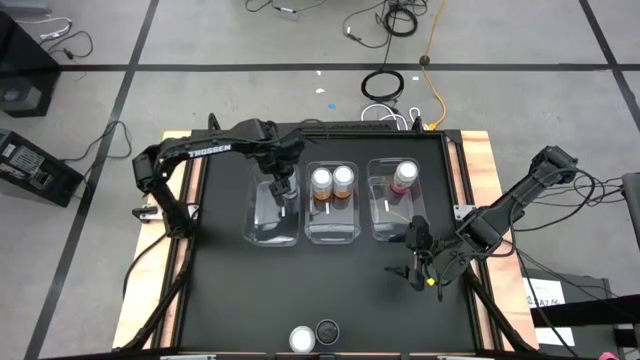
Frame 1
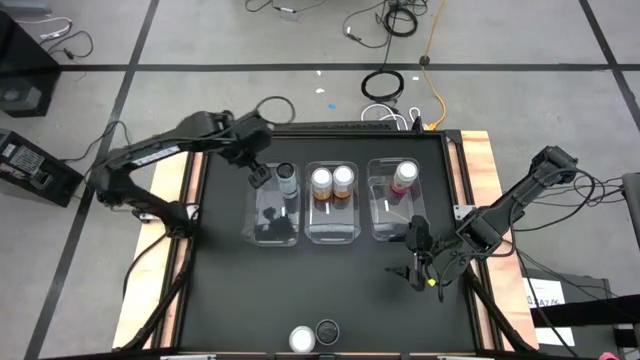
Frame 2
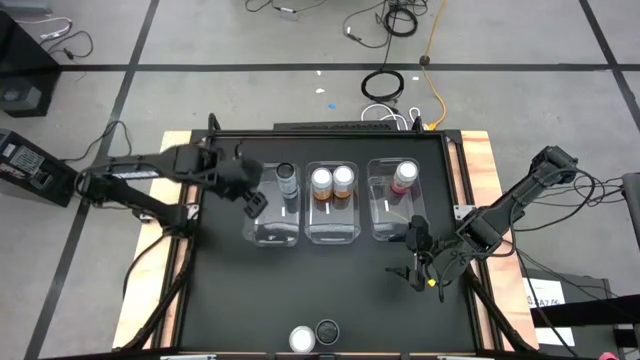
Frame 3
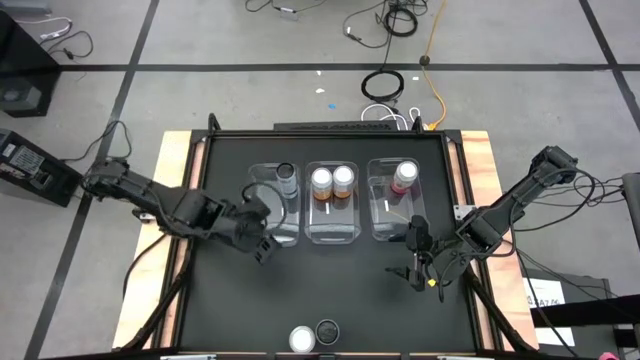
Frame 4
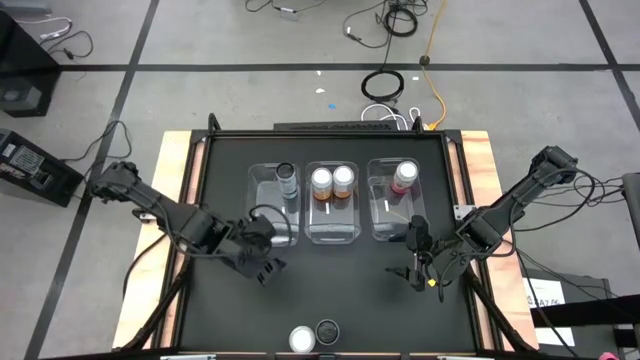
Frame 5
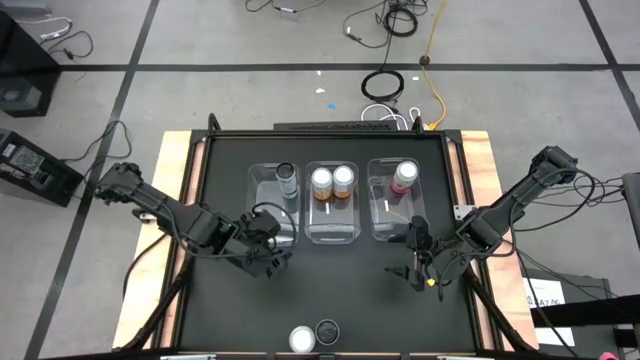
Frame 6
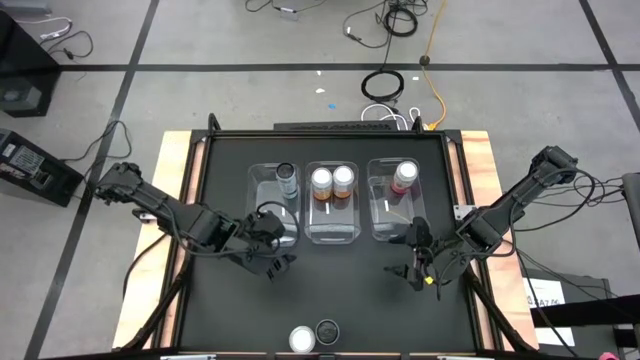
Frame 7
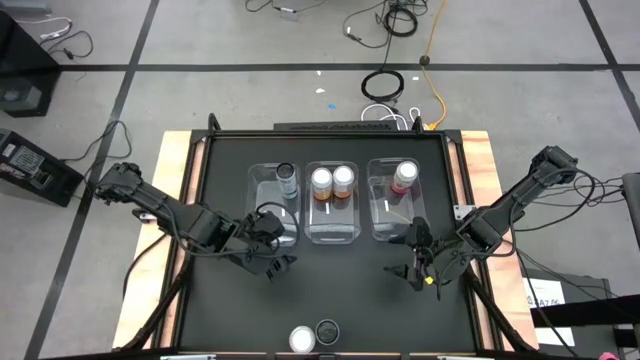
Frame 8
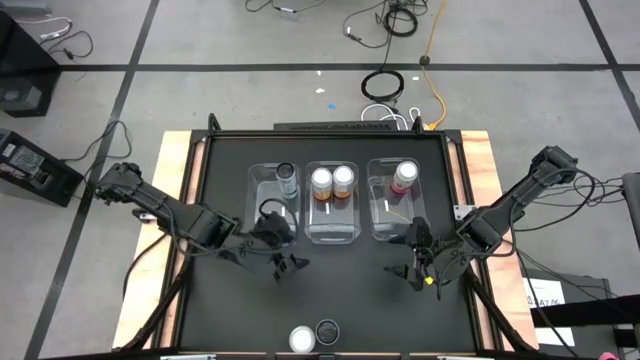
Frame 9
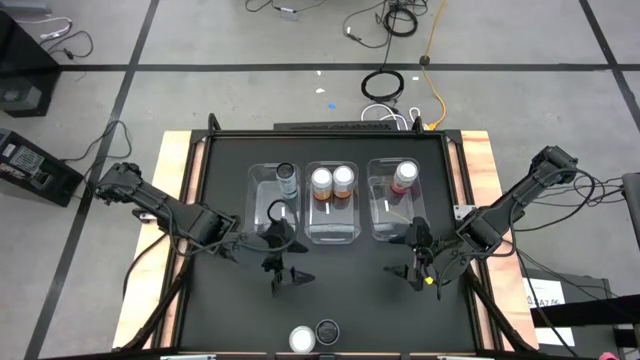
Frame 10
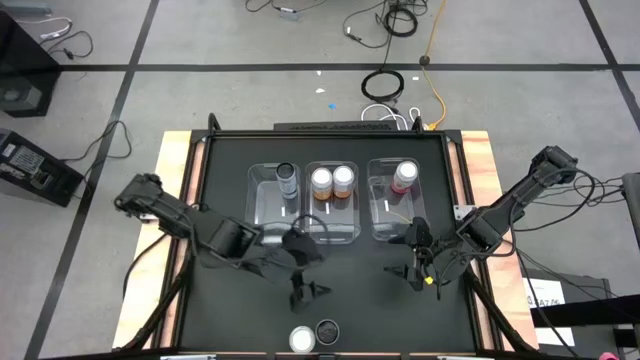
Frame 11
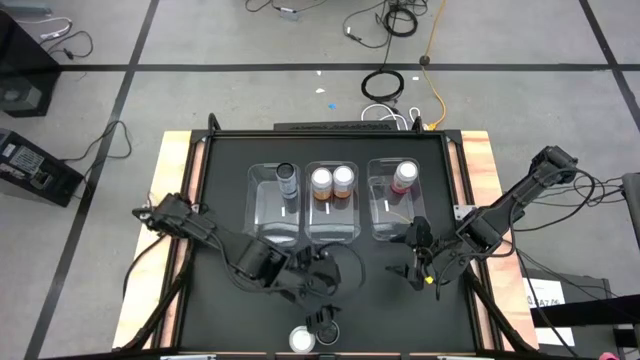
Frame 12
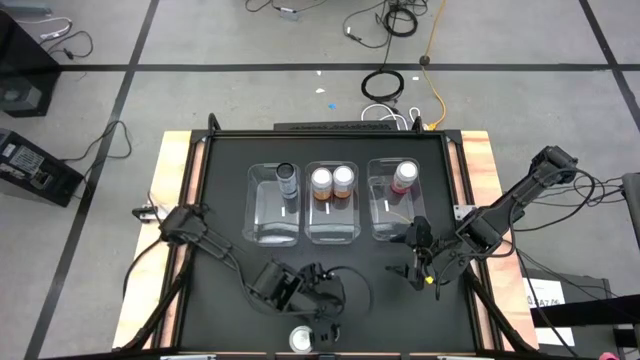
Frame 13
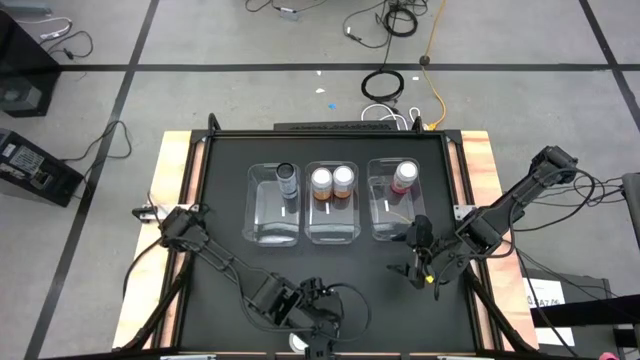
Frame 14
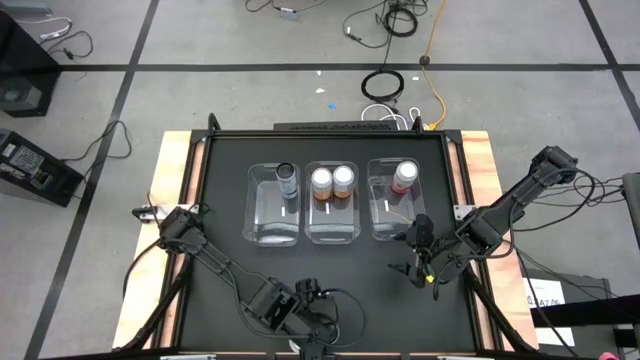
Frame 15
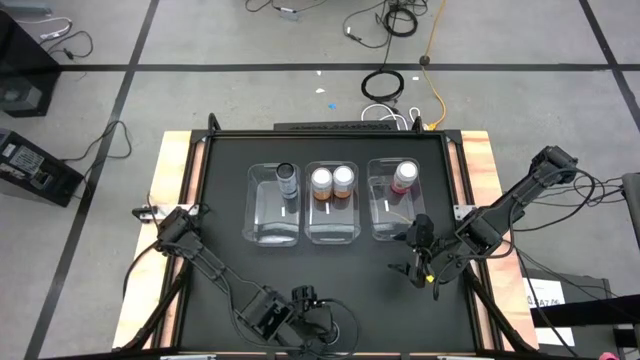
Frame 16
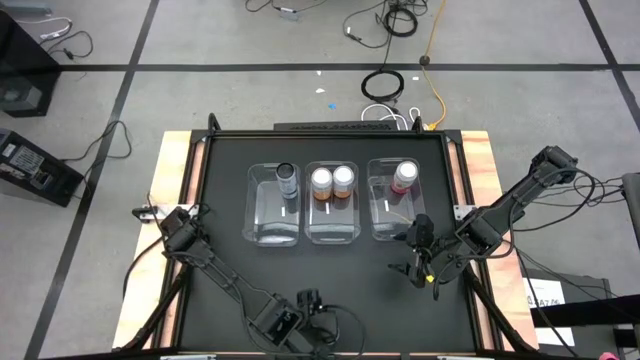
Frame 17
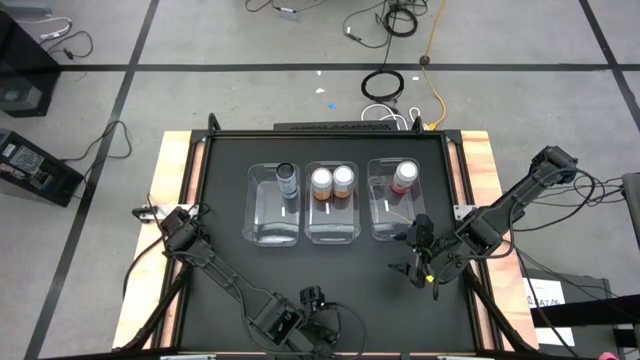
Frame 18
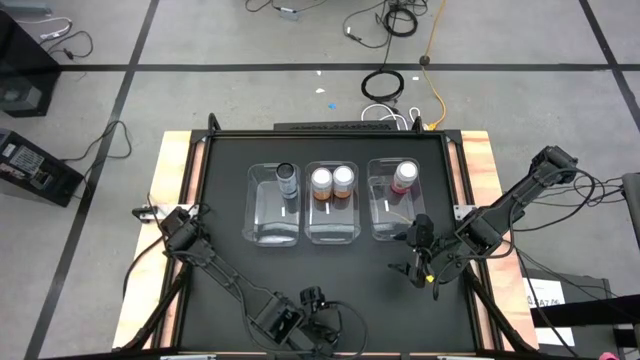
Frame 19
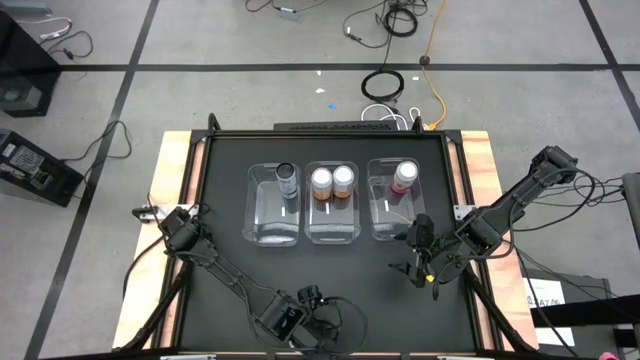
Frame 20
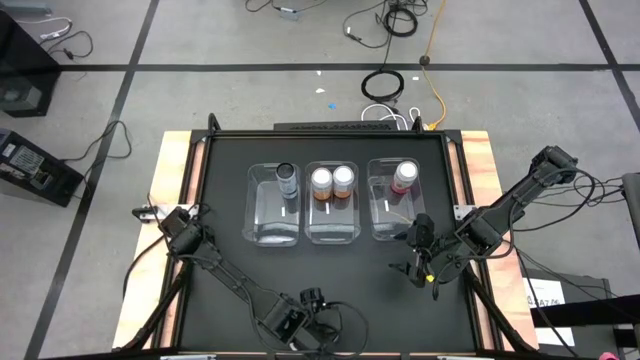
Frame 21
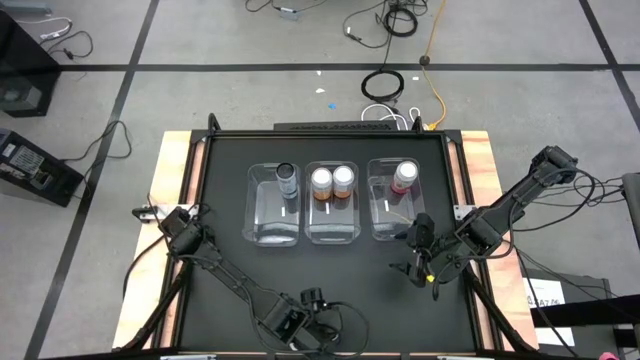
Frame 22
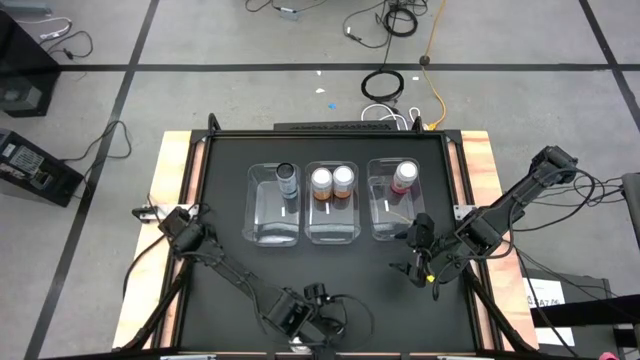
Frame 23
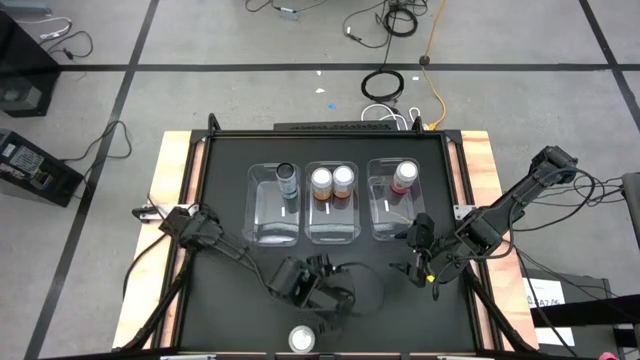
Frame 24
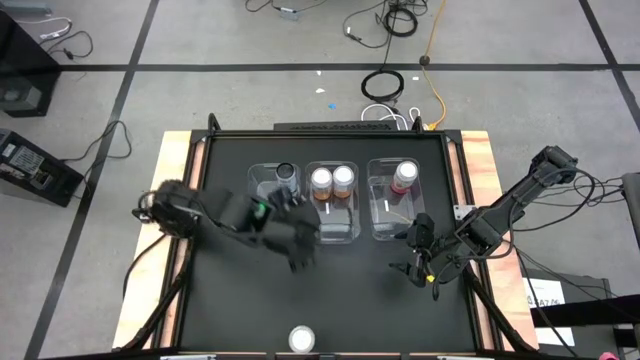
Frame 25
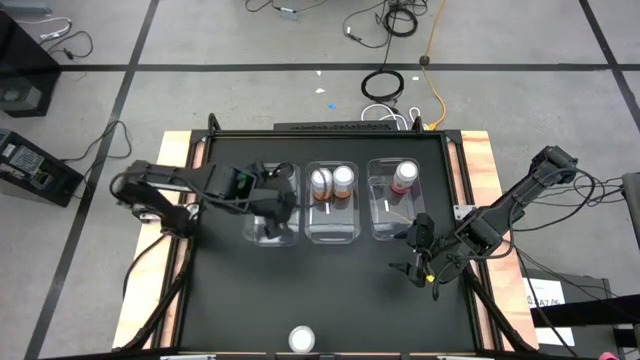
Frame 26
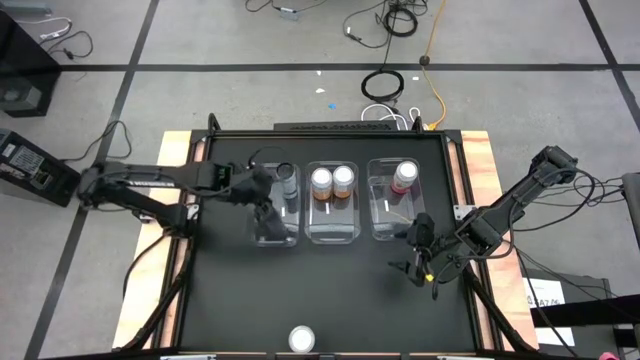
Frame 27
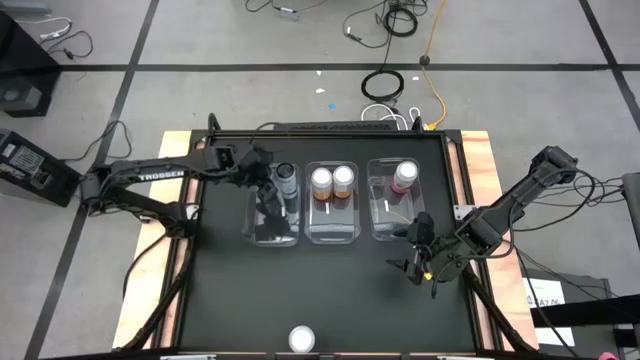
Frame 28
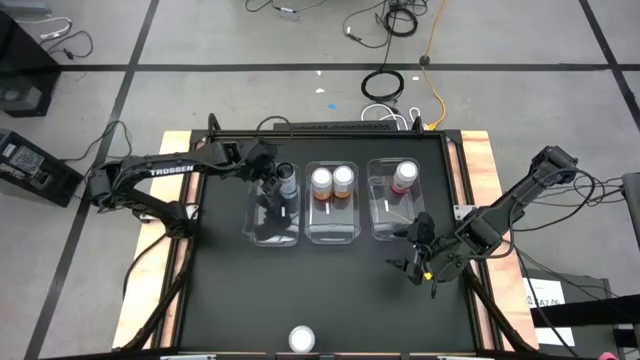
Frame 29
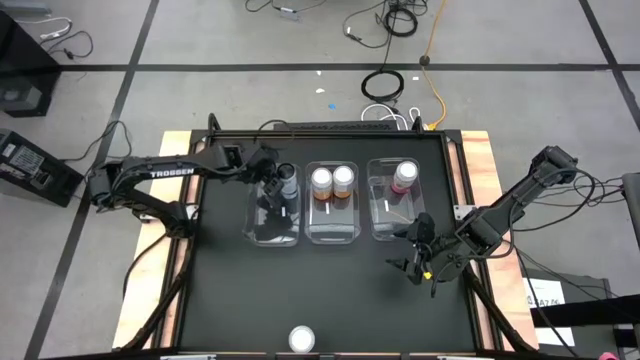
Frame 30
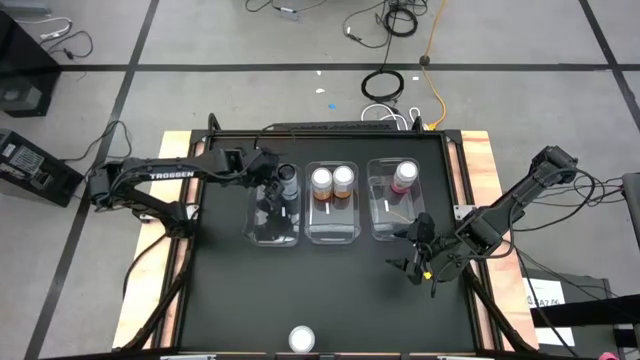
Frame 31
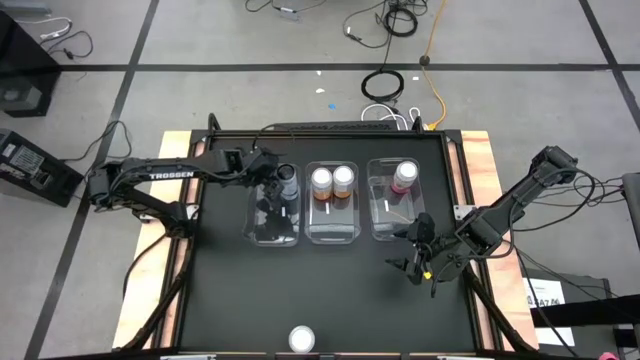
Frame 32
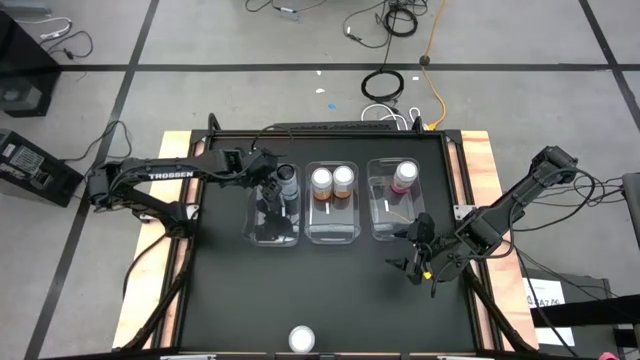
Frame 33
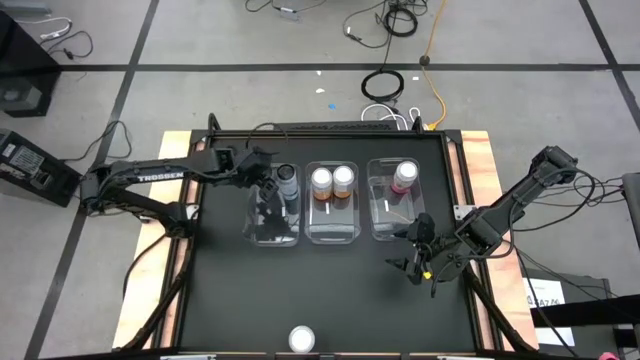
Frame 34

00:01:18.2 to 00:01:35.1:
Task: Sort soda cans
Put the white soda can into the left transparent bin

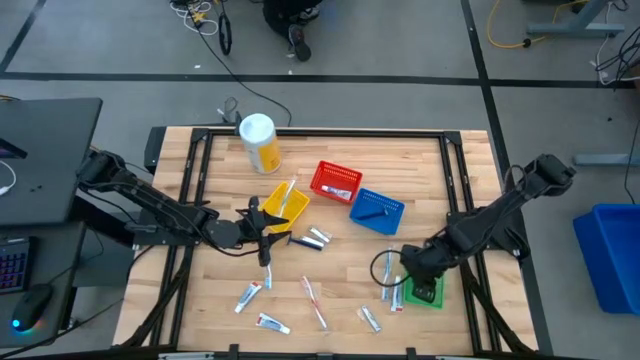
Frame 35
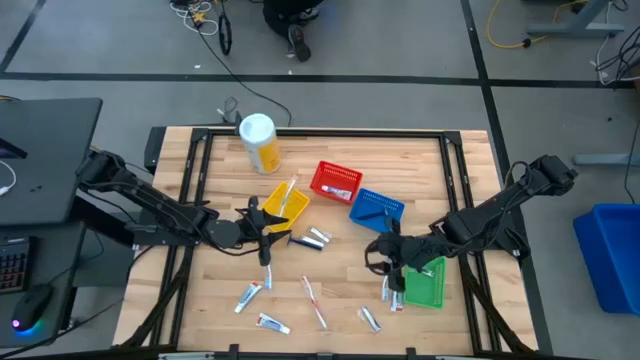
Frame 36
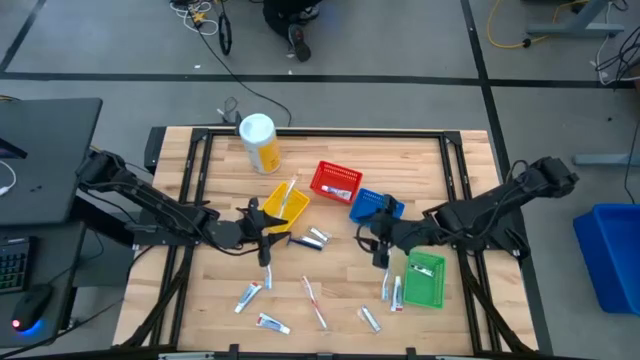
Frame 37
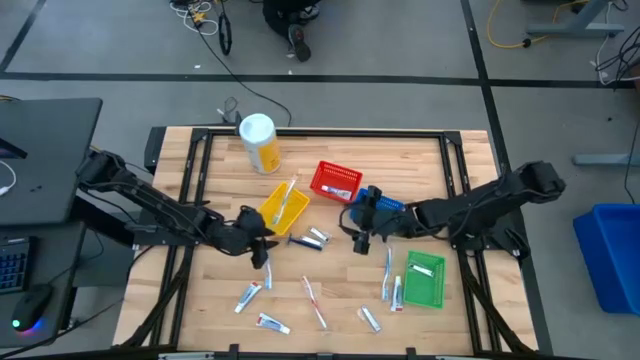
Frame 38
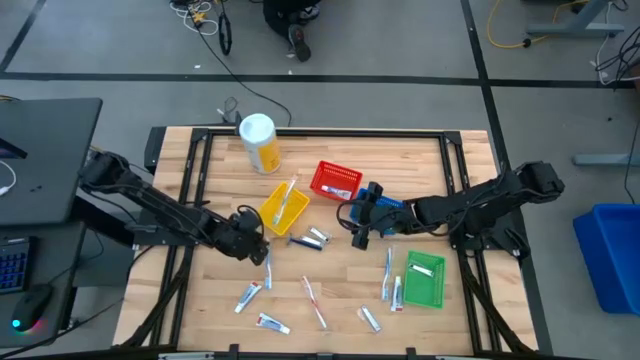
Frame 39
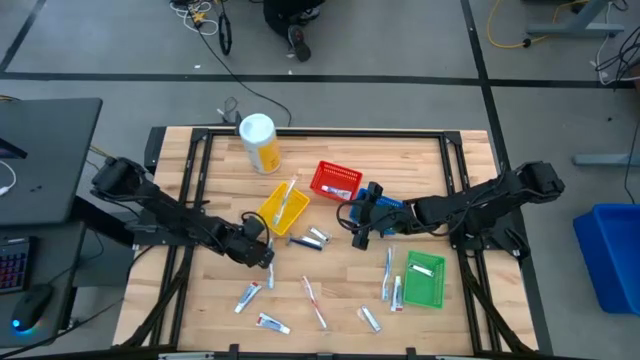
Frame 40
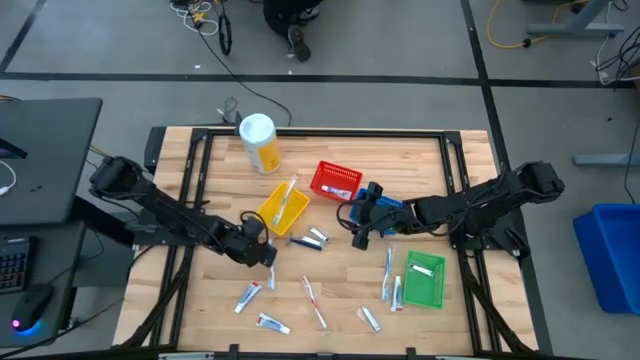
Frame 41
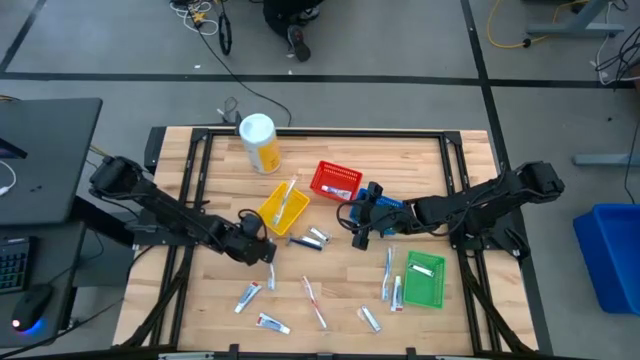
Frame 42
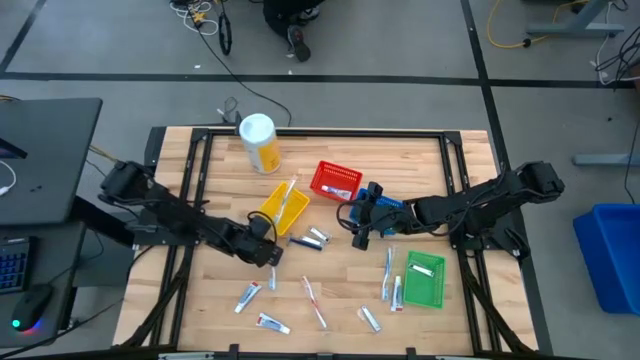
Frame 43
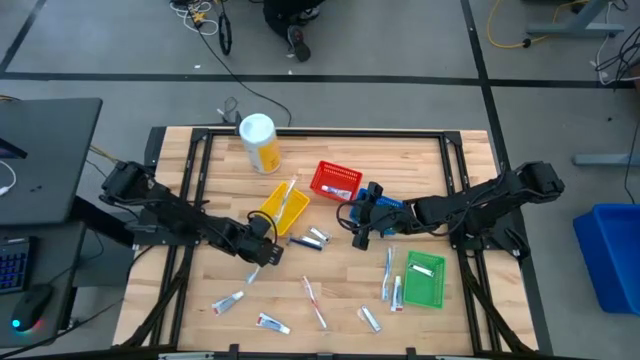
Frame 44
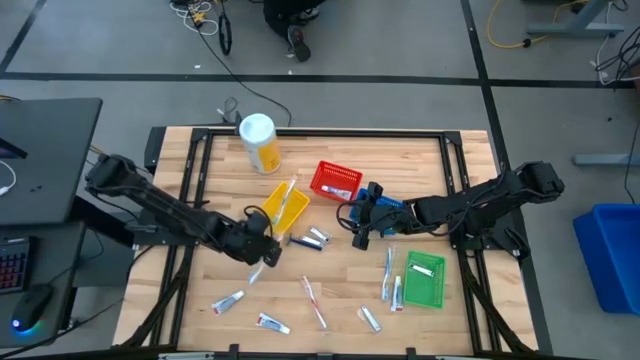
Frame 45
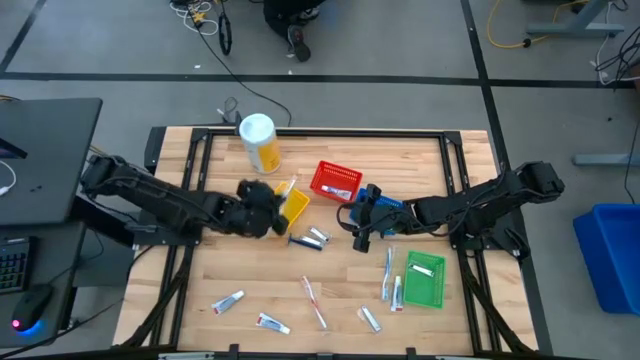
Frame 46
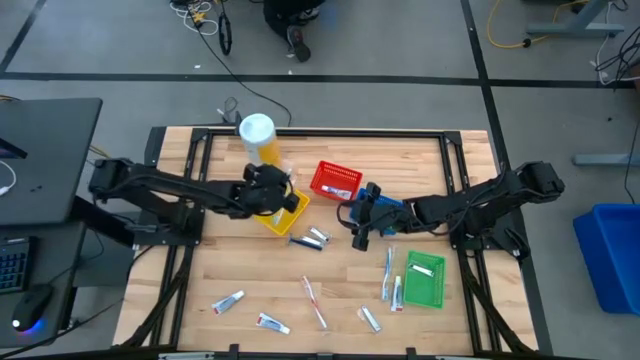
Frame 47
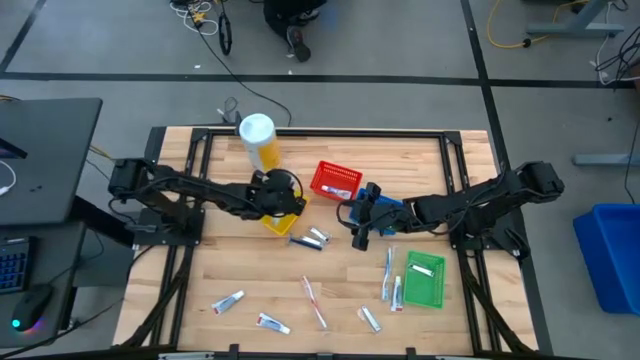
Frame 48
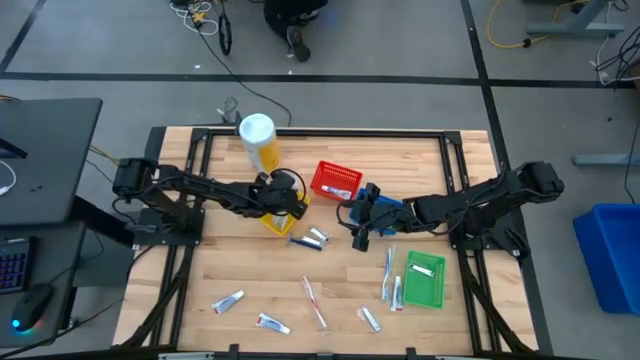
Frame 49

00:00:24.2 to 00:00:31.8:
Task: Pick & Place Travel size toiletries
Put the blue toothbrush into the yellow bin
